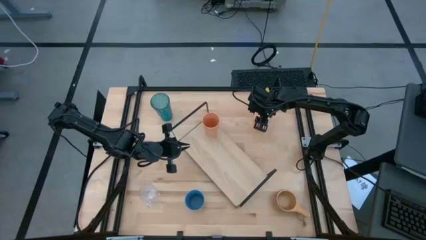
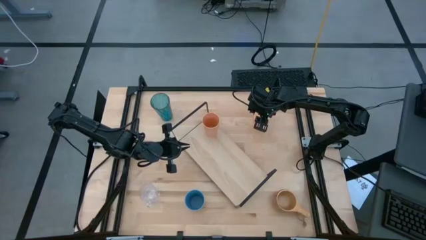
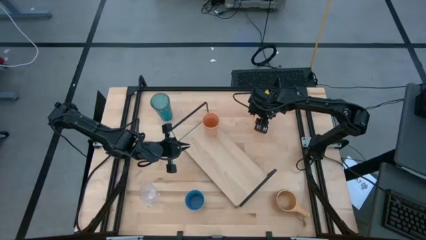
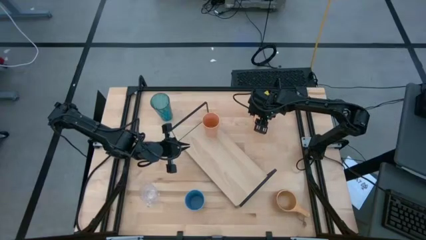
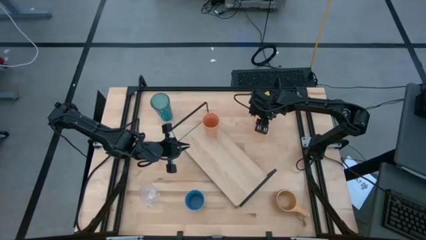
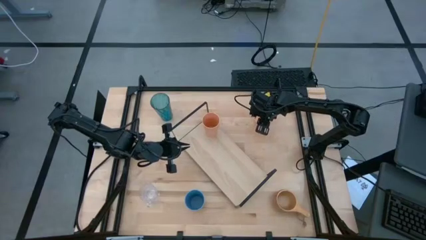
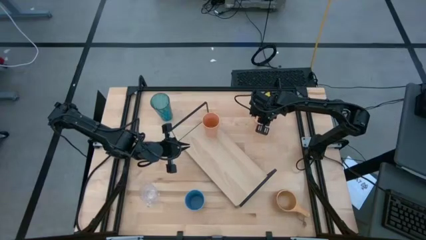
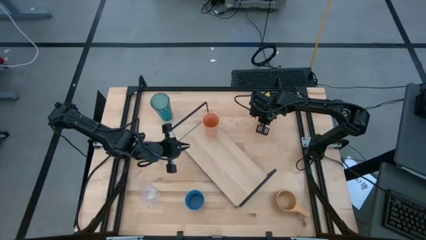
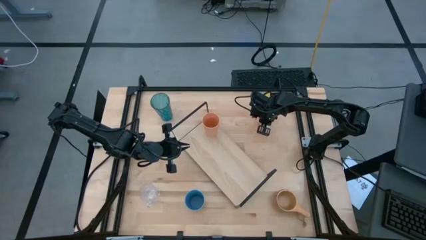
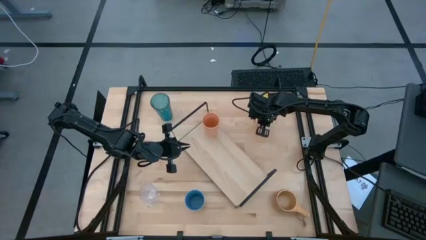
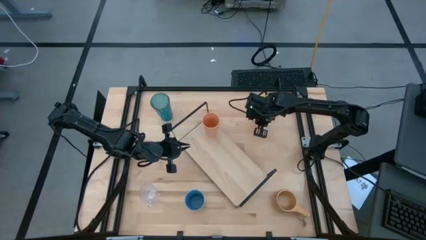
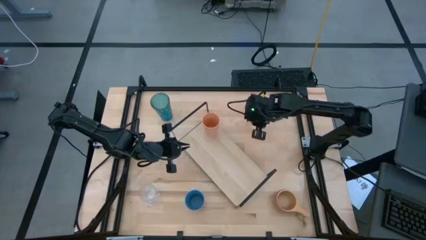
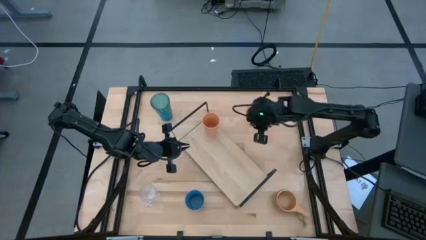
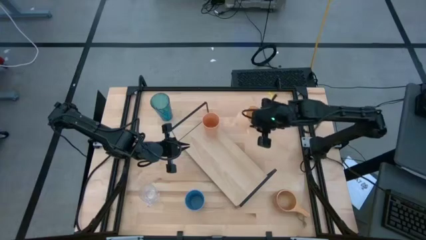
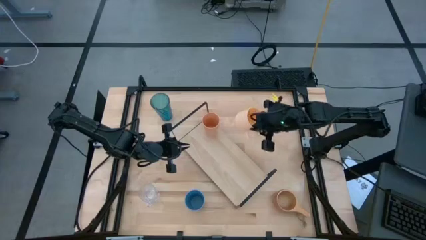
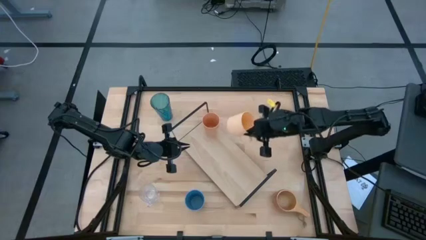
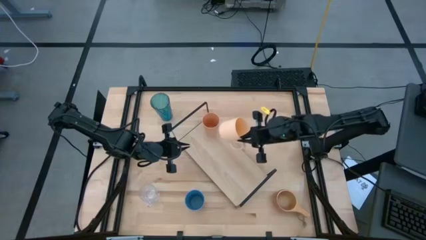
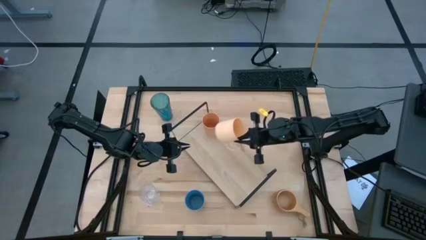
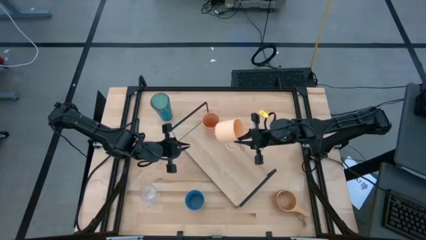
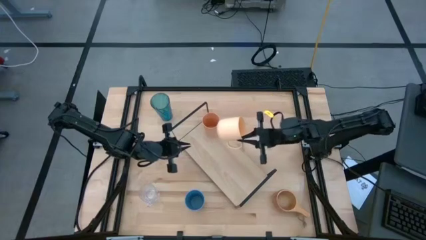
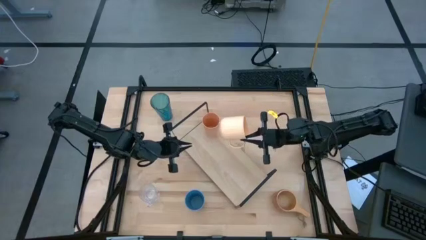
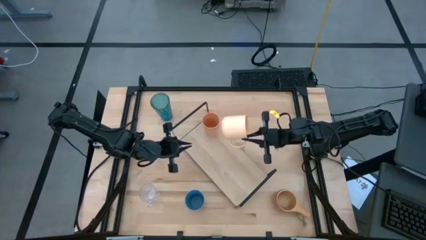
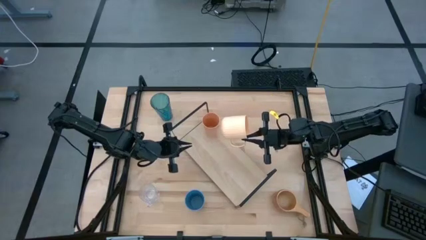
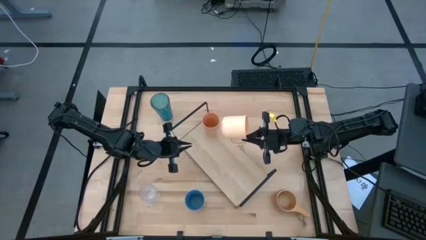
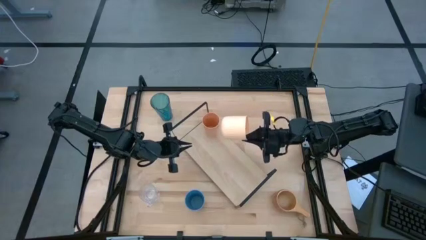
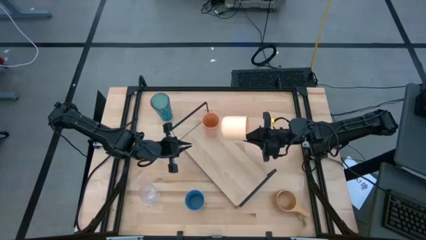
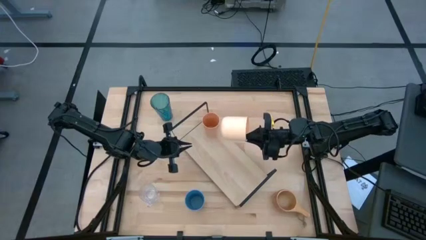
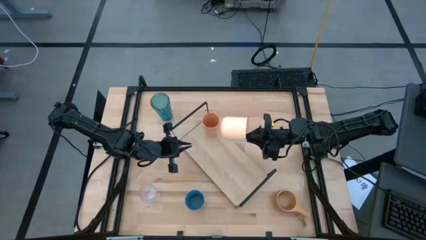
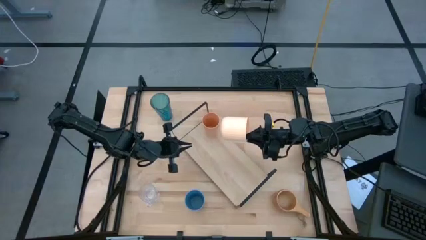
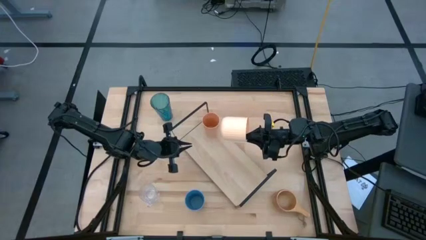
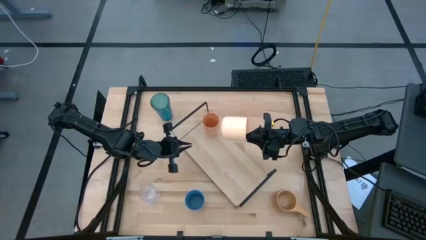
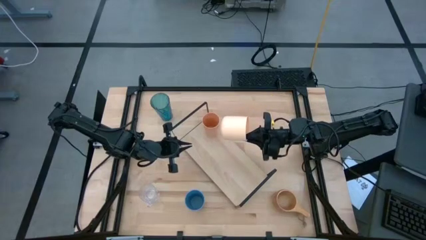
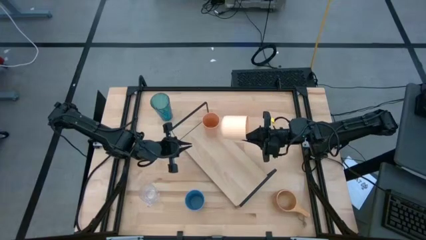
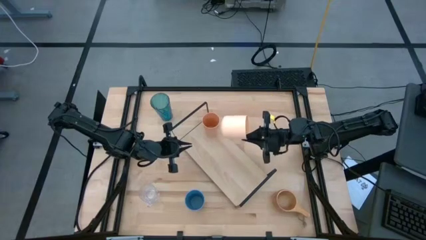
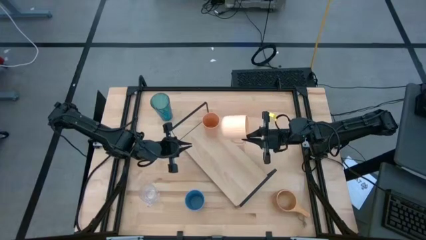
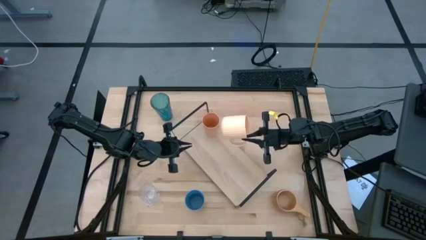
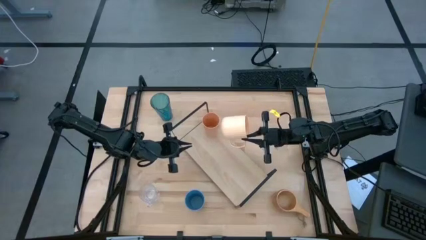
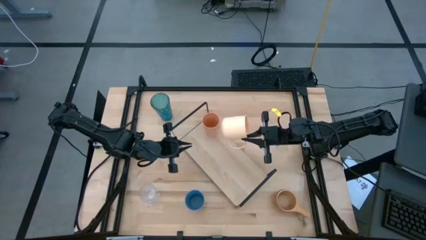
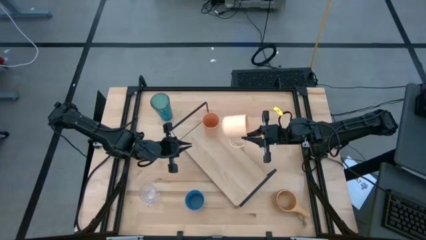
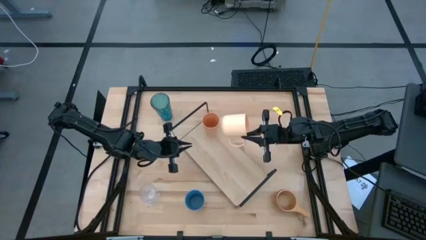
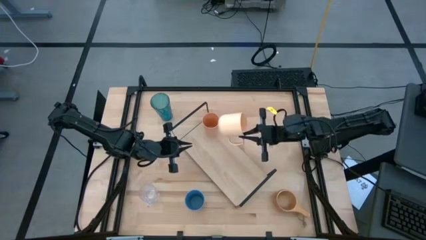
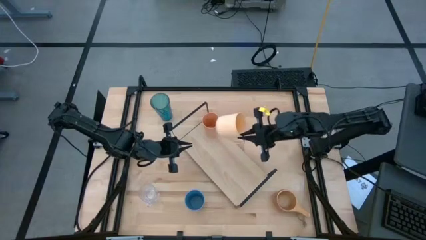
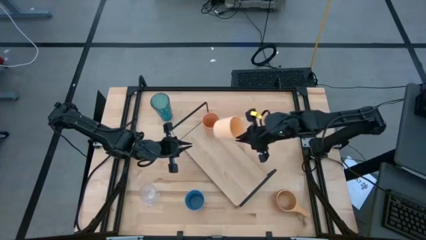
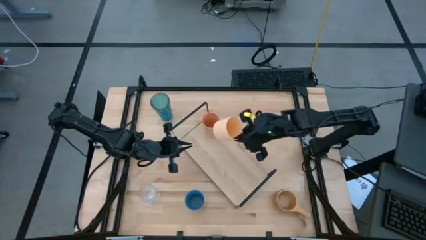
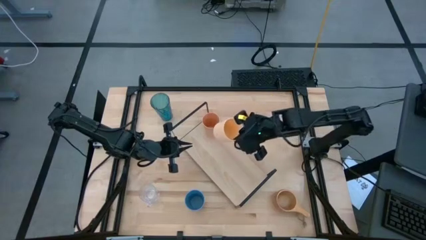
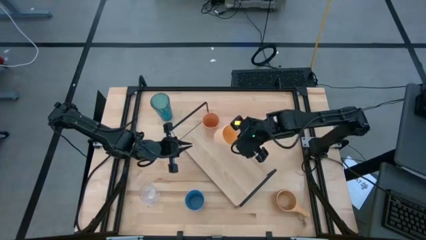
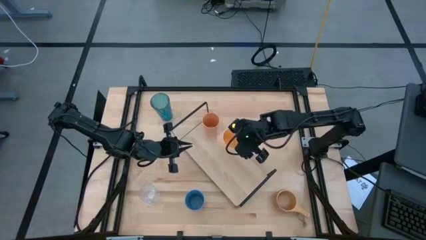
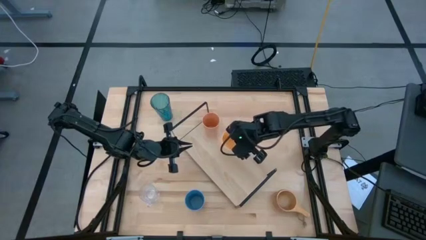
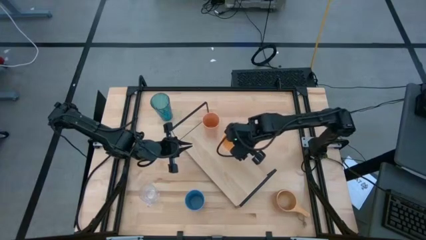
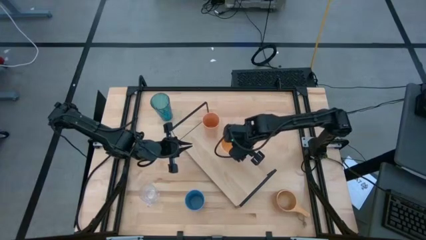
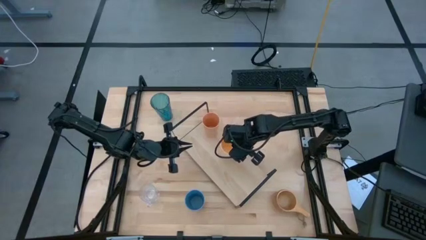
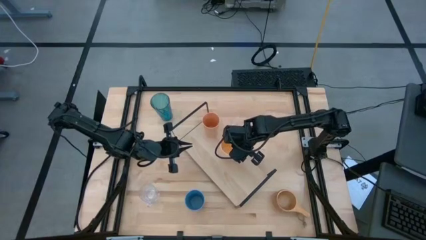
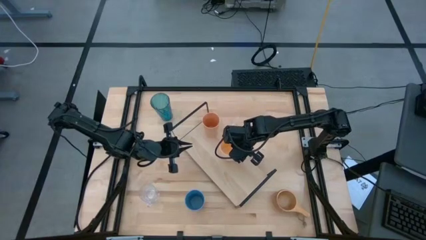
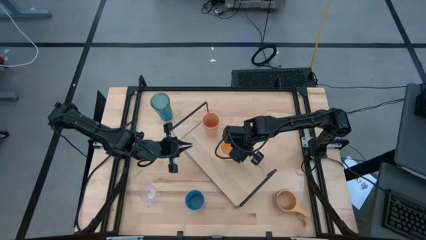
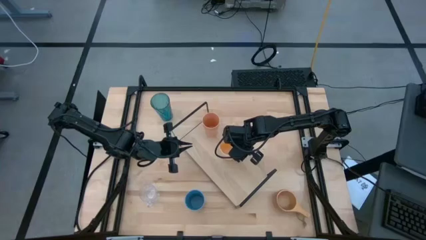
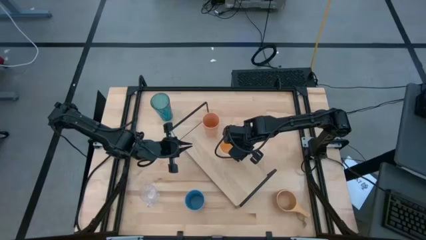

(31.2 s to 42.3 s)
Task: Stack small to large cups/mugs on shelf
Put the yellow mug on the shelf
